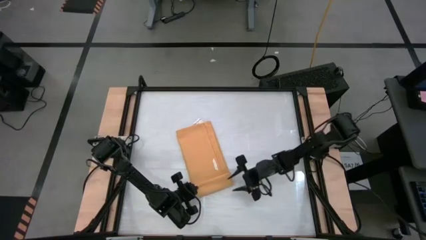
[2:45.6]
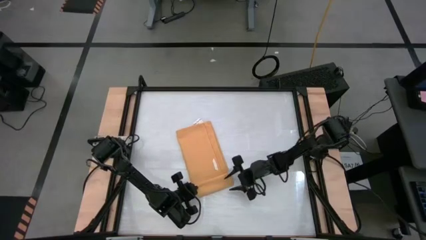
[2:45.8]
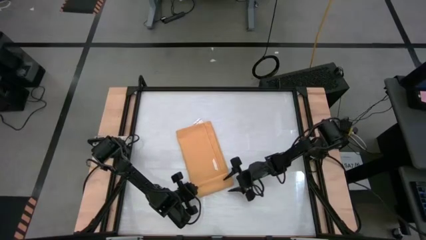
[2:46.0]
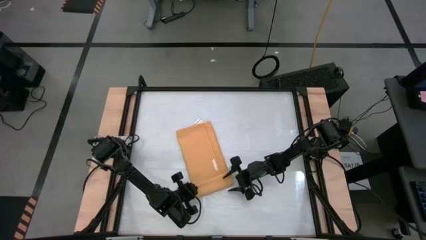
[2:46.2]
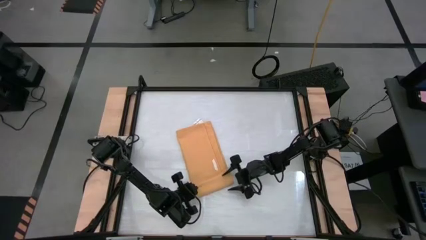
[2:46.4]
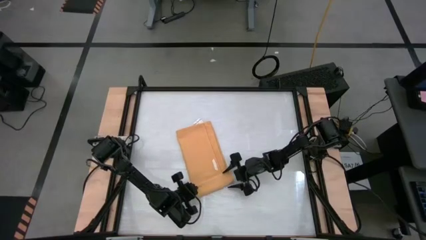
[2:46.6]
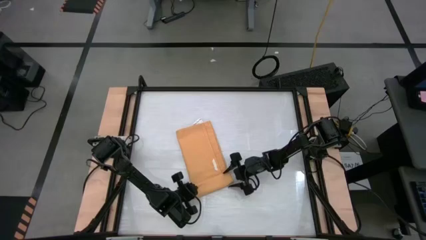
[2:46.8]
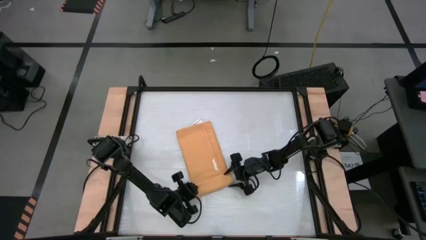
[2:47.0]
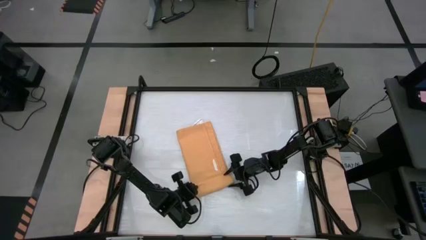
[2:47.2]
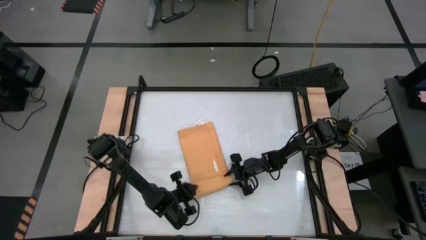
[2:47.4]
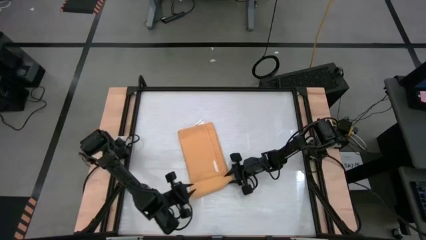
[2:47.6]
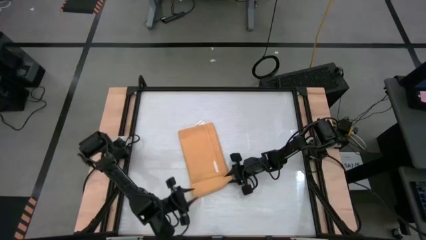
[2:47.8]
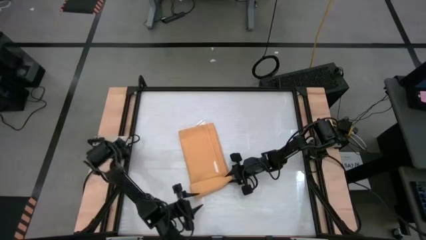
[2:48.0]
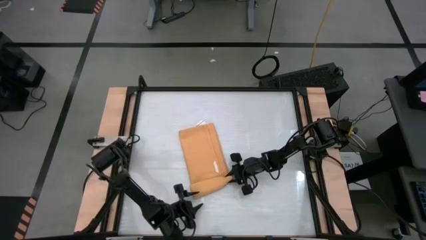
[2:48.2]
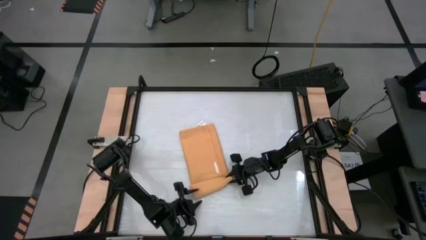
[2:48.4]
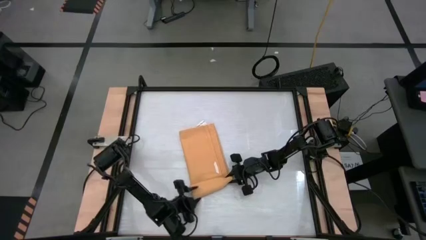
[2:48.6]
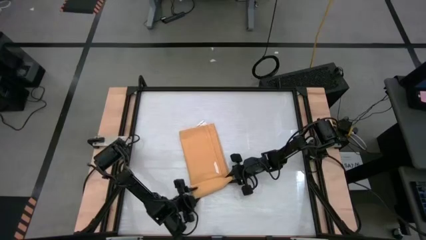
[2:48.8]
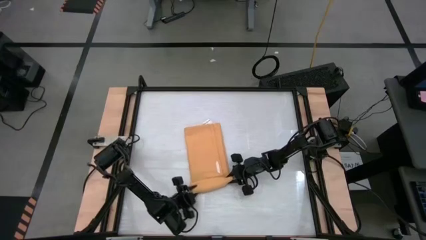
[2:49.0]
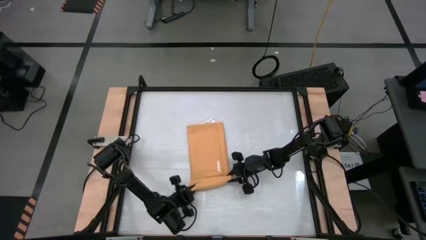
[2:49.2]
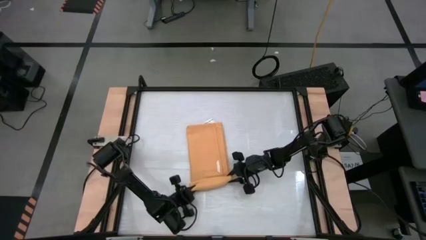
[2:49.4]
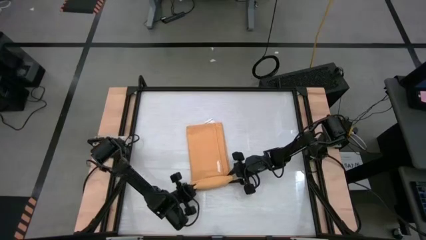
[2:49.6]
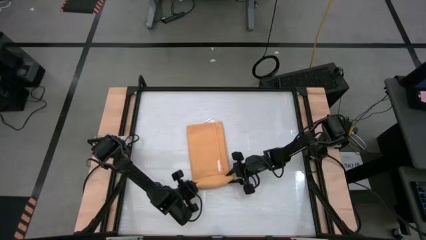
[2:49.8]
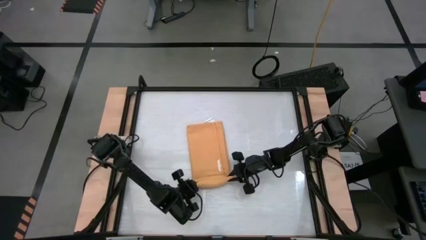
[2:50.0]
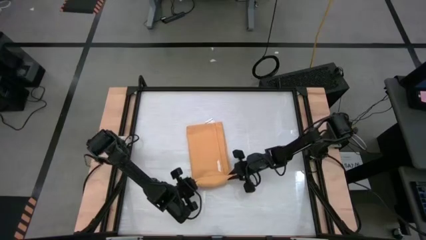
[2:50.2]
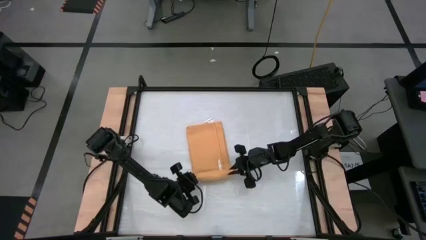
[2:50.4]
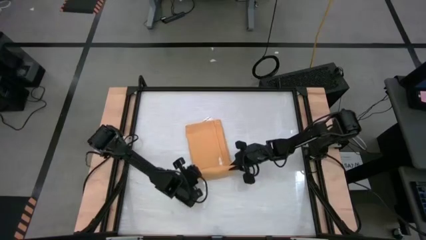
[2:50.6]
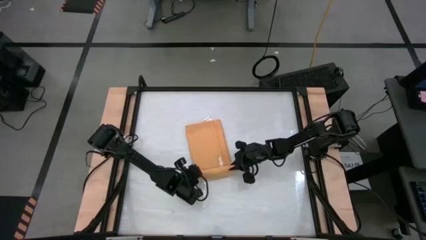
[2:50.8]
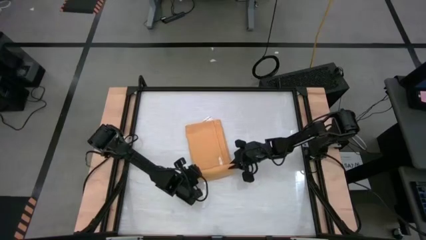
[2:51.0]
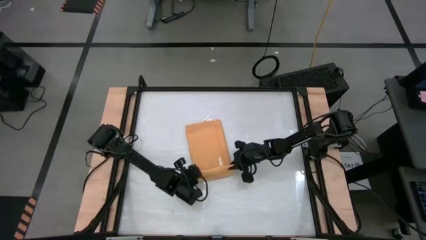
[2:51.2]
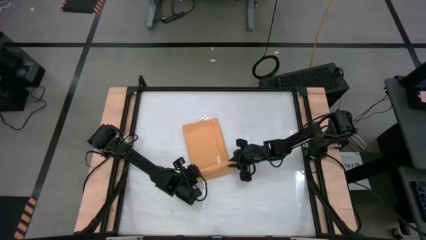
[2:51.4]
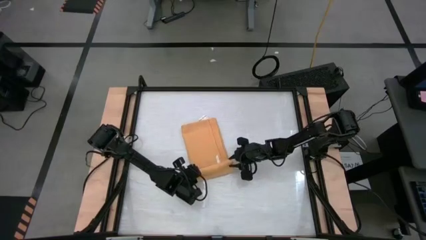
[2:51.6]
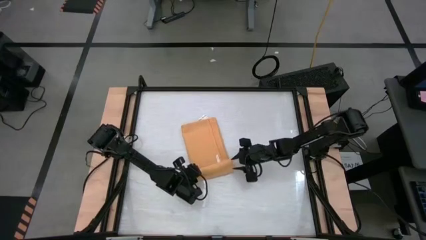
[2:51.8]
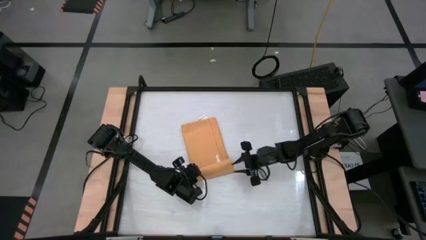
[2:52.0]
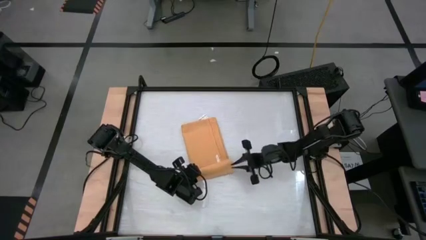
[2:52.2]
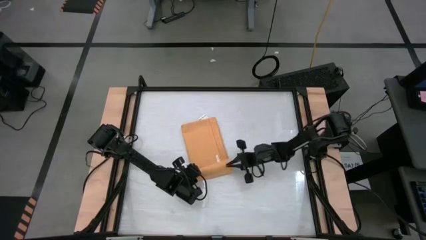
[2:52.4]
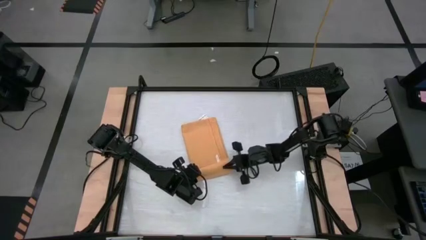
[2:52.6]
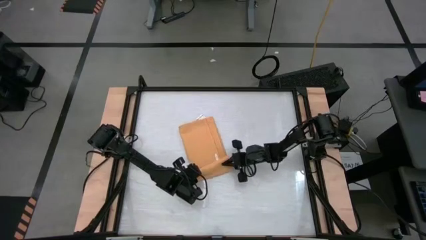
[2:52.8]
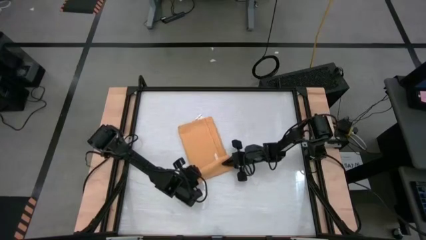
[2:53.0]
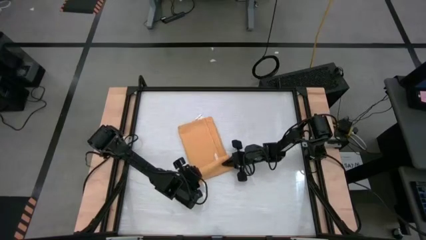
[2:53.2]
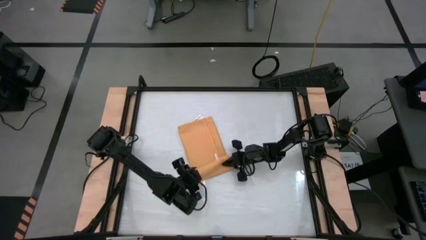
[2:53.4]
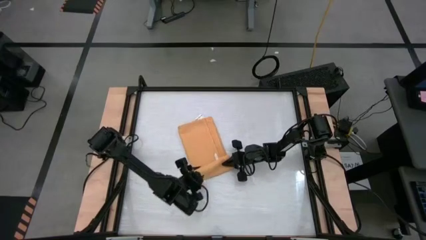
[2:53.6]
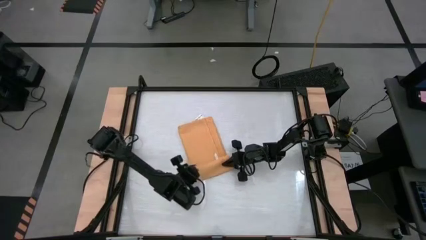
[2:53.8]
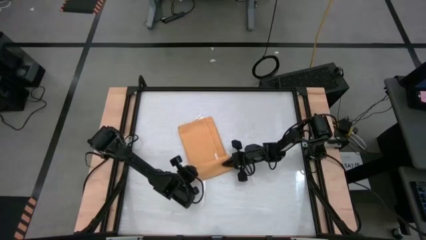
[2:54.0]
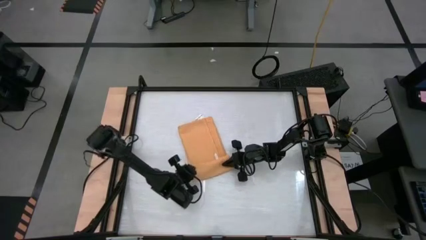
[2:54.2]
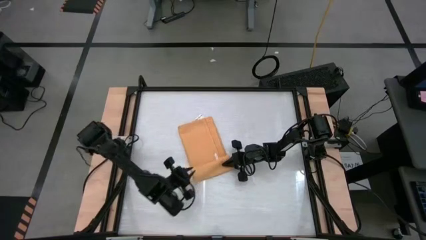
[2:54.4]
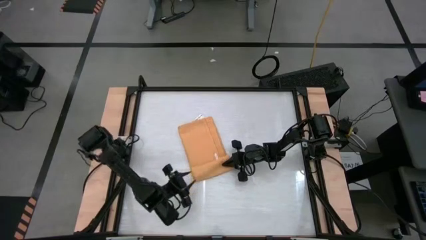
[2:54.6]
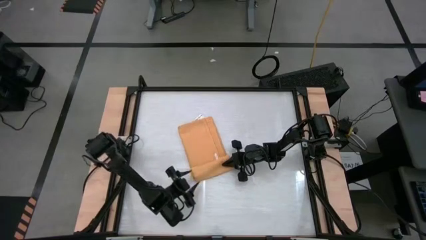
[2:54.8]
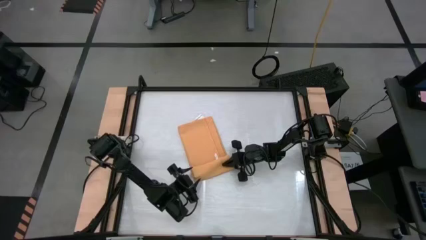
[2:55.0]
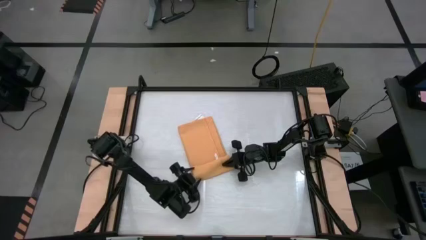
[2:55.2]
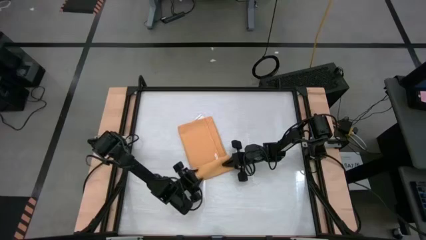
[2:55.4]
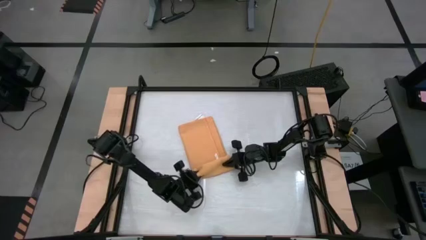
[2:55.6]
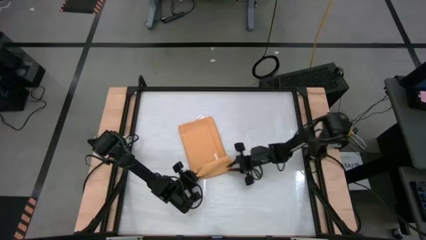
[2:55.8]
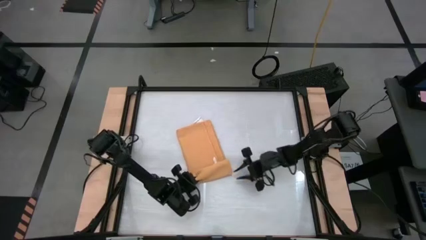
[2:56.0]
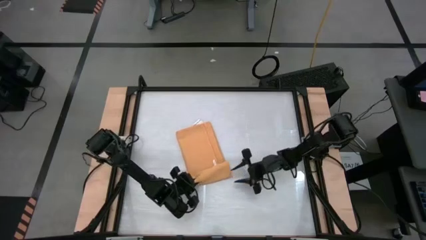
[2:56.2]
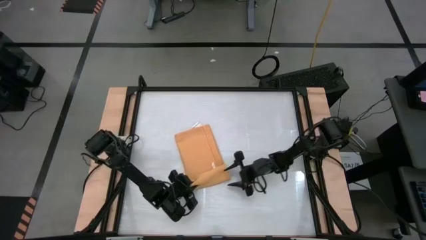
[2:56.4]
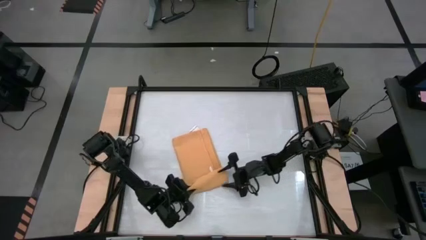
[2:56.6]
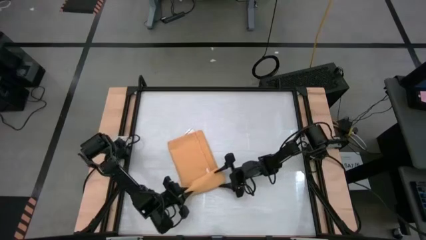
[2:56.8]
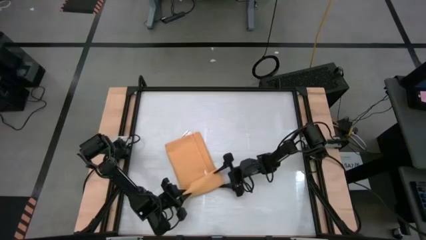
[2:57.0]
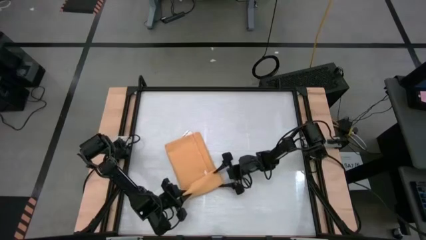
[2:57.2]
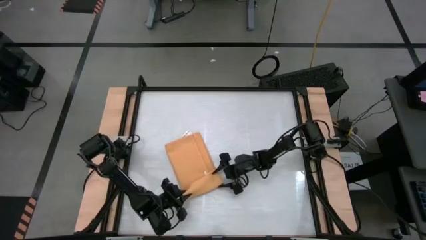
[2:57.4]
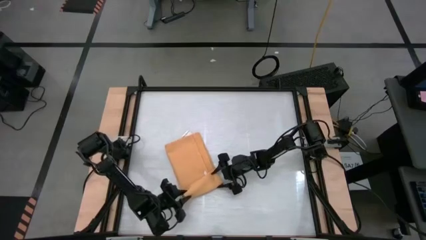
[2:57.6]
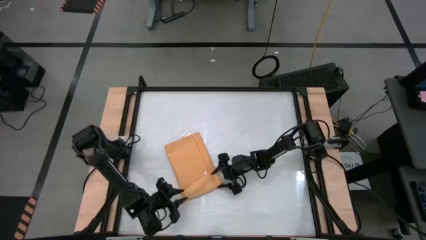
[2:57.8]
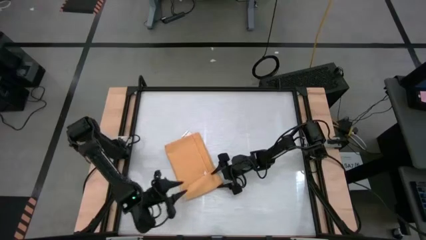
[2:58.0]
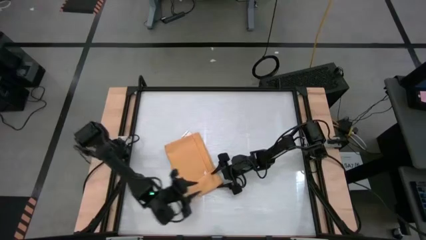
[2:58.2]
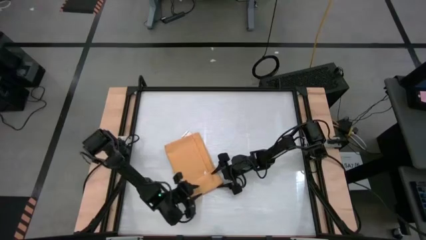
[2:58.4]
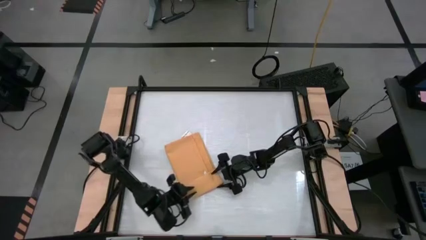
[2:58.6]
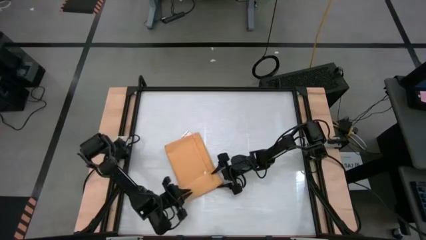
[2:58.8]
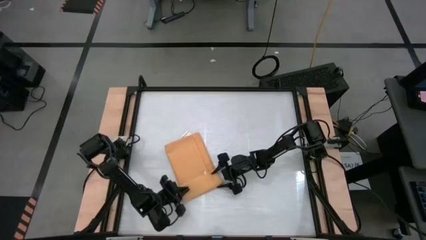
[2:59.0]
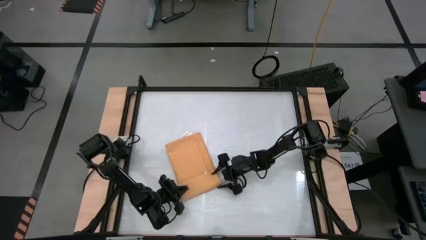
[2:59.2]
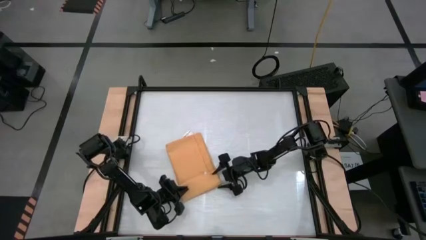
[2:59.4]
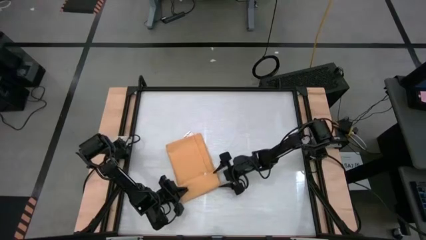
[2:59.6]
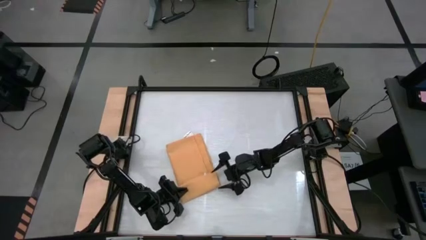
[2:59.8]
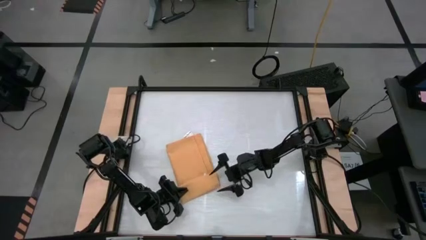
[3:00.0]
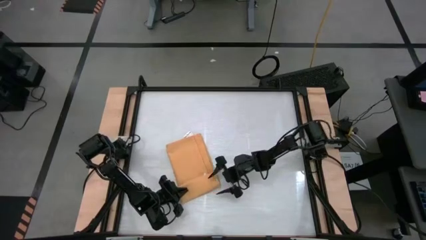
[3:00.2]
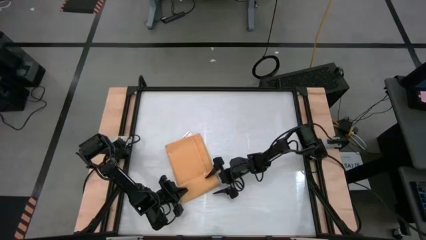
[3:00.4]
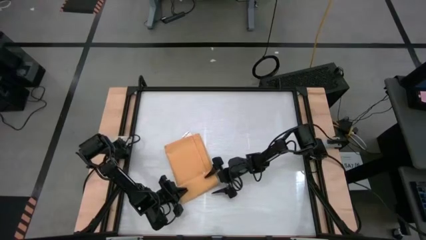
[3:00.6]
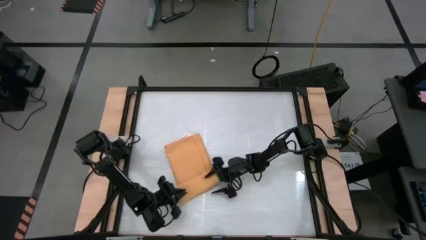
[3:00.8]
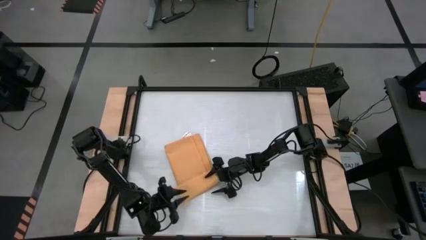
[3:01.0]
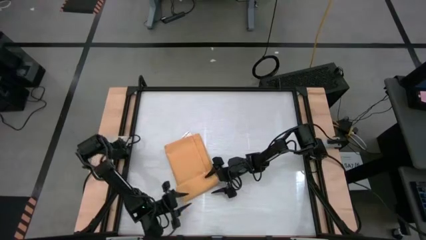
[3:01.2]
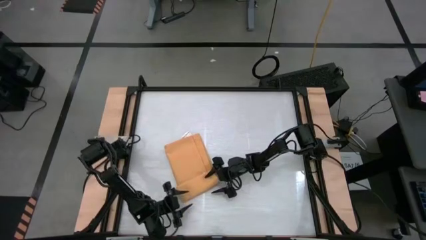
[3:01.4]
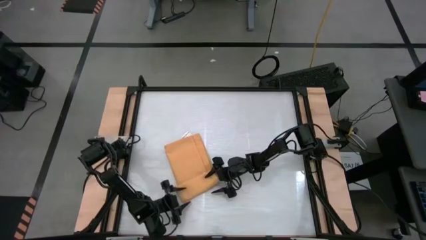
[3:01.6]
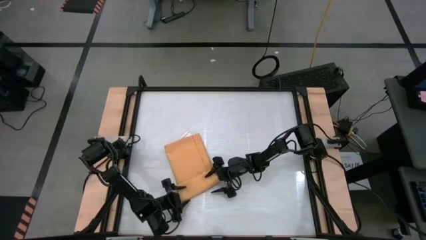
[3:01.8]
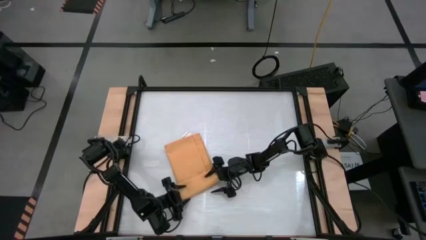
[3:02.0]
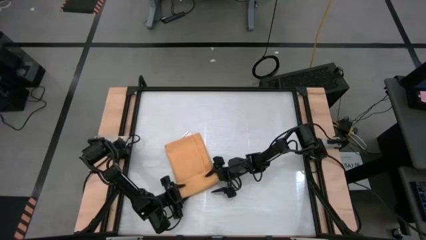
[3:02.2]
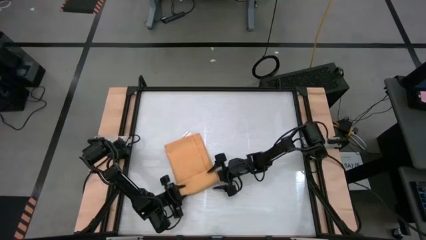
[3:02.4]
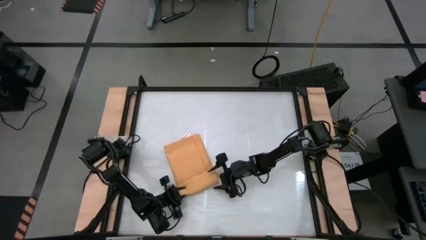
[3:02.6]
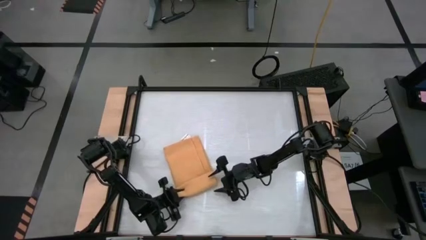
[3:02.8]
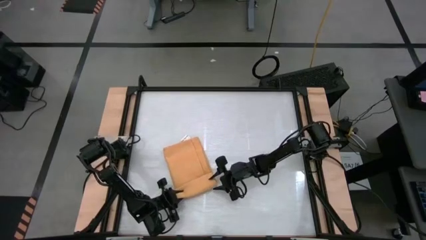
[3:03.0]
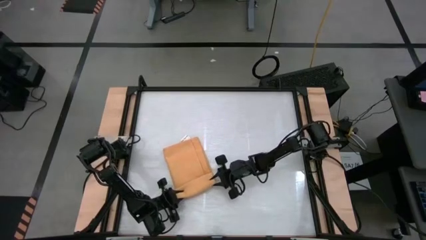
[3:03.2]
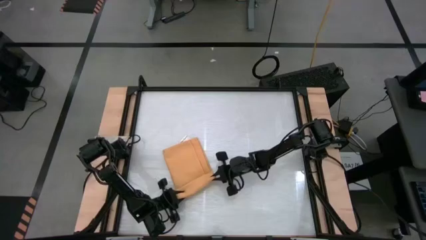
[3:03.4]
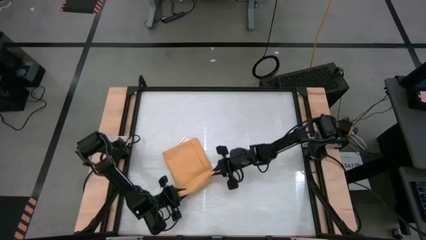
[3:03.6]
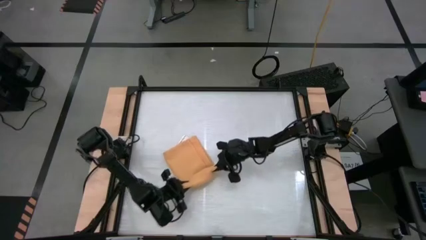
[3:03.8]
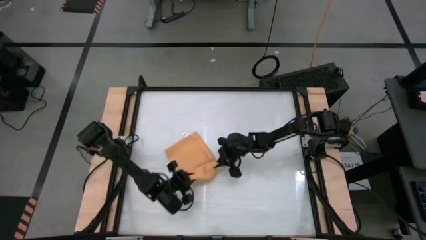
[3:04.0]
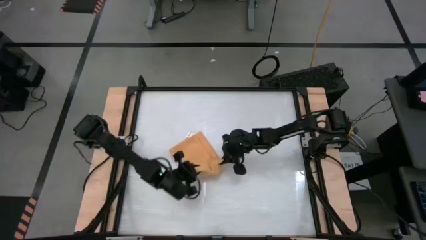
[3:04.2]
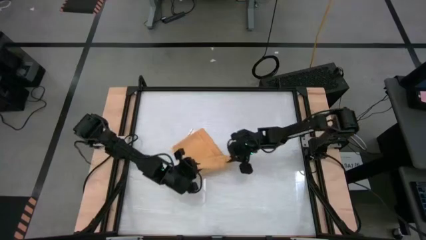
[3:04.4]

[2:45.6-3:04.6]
Task: Roll towel
Roll the yellow towel
